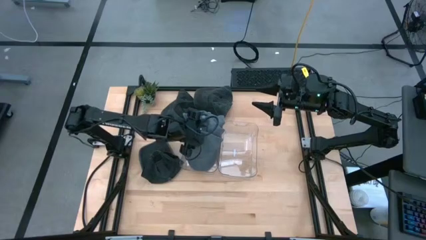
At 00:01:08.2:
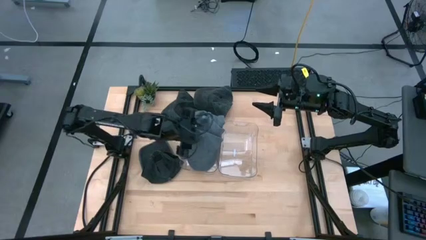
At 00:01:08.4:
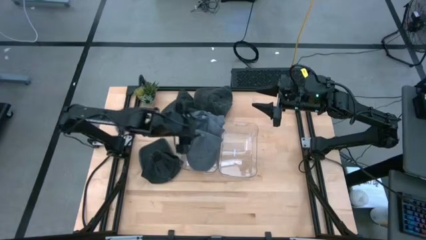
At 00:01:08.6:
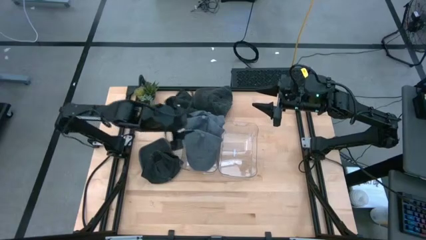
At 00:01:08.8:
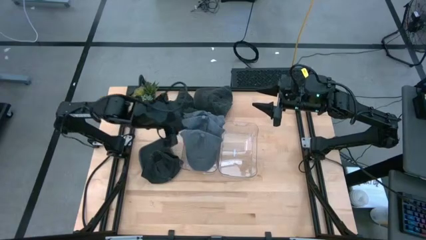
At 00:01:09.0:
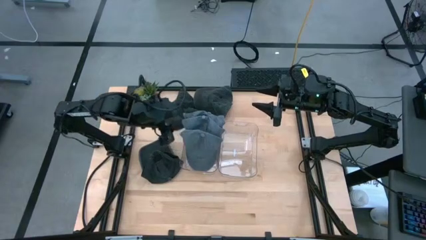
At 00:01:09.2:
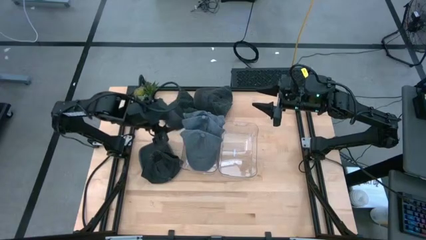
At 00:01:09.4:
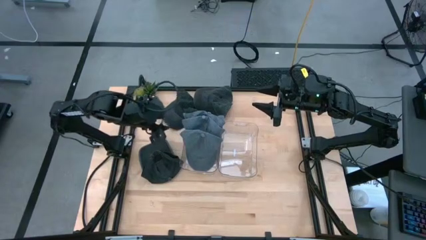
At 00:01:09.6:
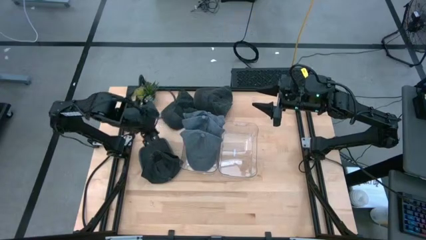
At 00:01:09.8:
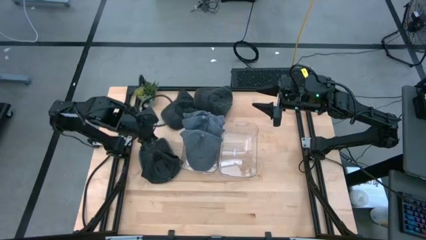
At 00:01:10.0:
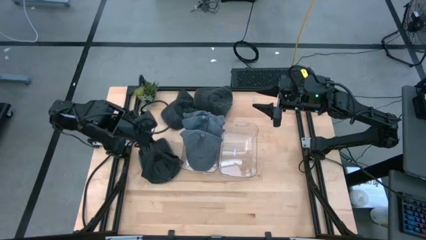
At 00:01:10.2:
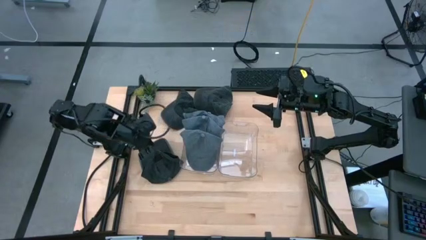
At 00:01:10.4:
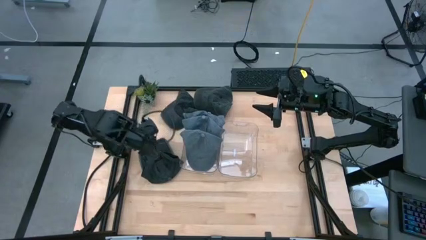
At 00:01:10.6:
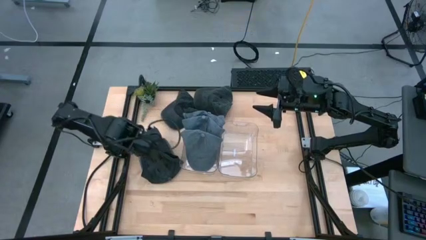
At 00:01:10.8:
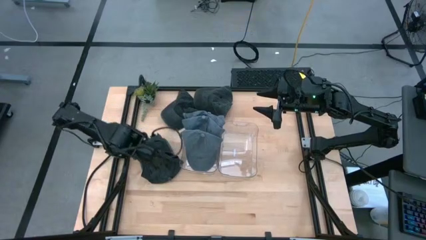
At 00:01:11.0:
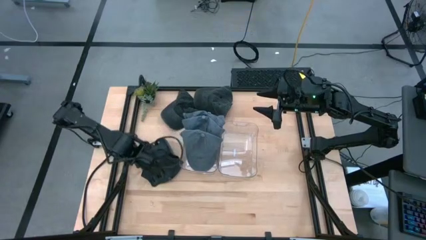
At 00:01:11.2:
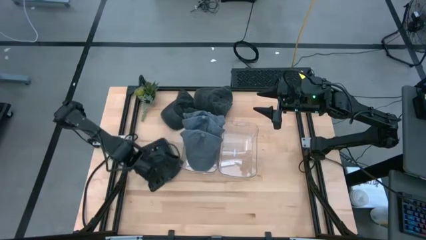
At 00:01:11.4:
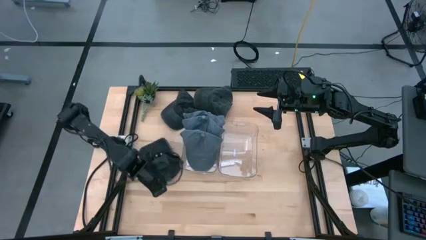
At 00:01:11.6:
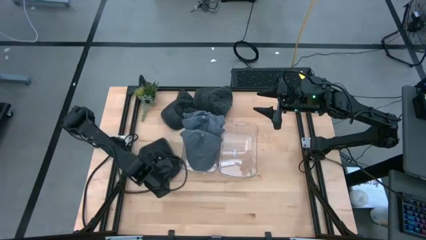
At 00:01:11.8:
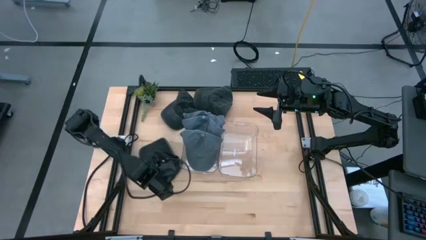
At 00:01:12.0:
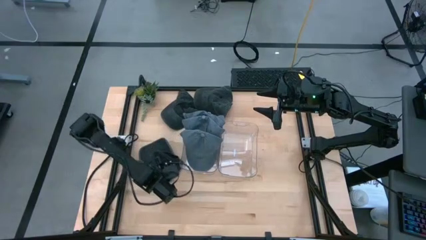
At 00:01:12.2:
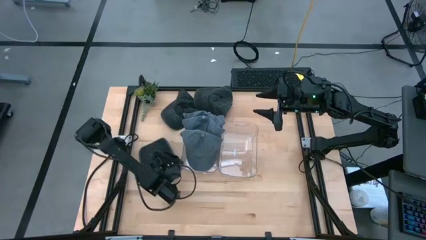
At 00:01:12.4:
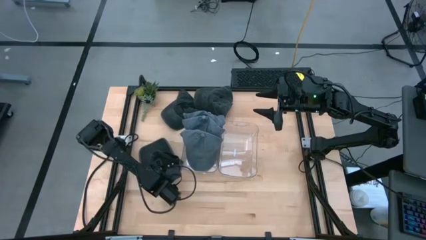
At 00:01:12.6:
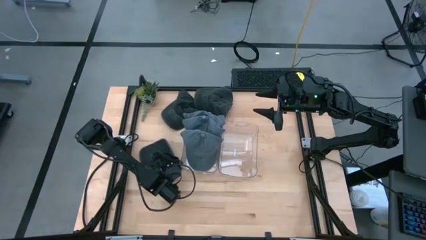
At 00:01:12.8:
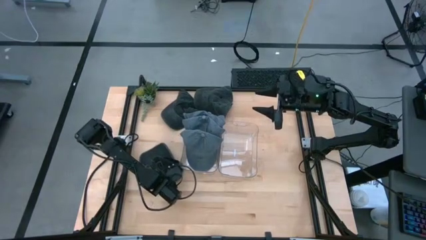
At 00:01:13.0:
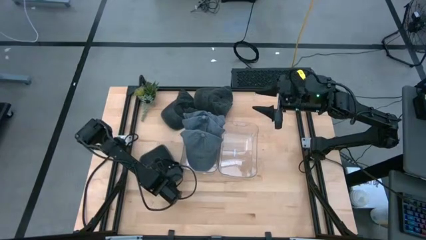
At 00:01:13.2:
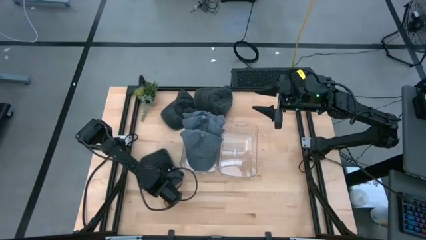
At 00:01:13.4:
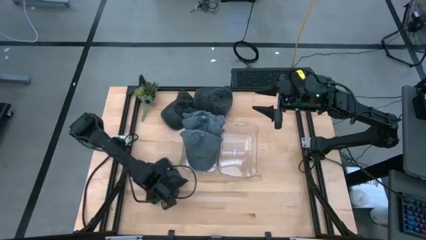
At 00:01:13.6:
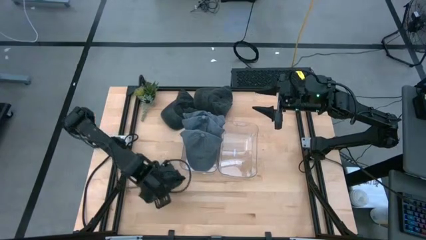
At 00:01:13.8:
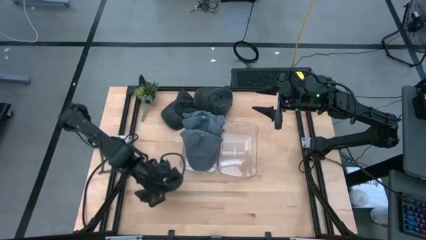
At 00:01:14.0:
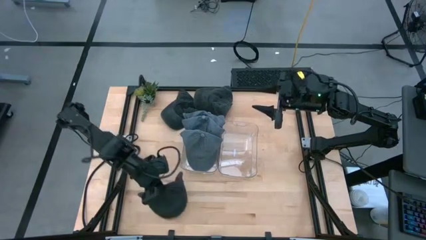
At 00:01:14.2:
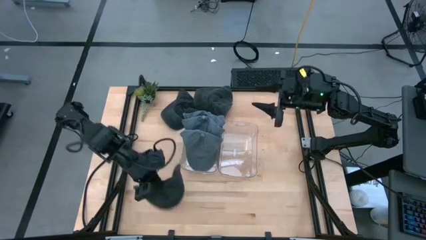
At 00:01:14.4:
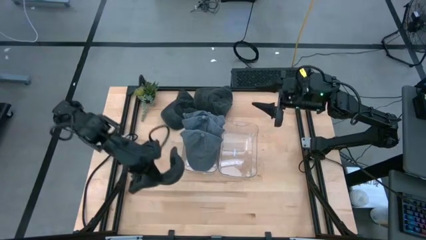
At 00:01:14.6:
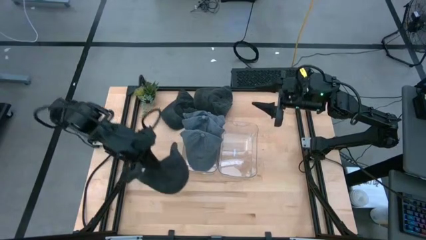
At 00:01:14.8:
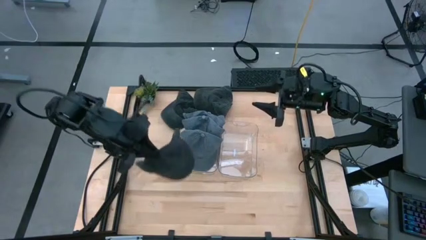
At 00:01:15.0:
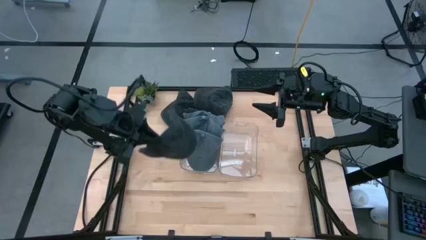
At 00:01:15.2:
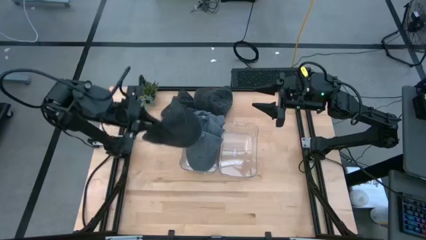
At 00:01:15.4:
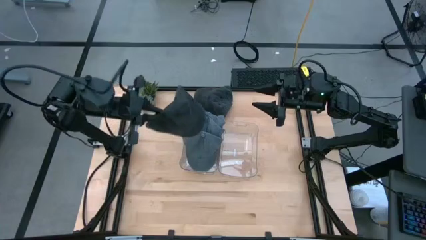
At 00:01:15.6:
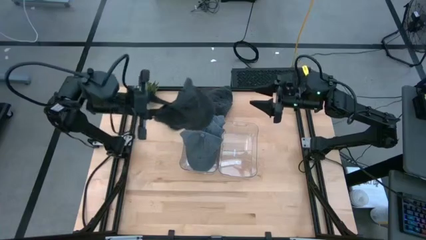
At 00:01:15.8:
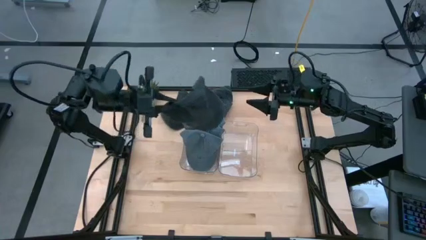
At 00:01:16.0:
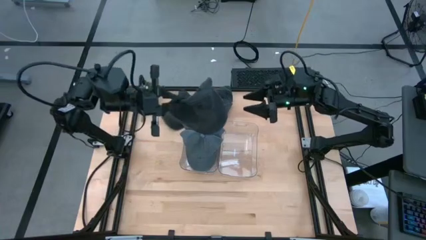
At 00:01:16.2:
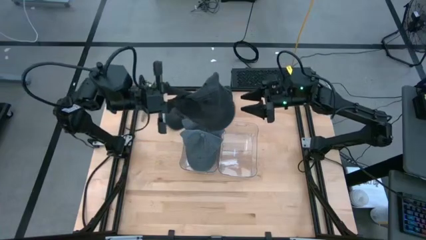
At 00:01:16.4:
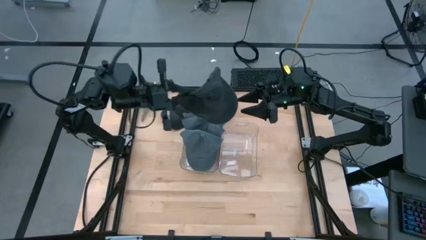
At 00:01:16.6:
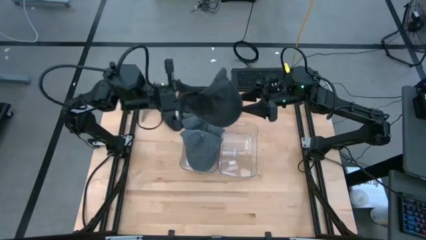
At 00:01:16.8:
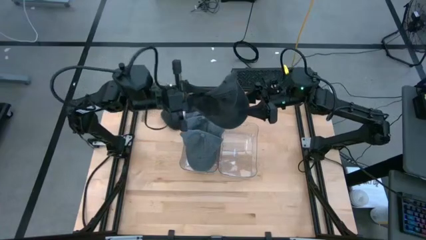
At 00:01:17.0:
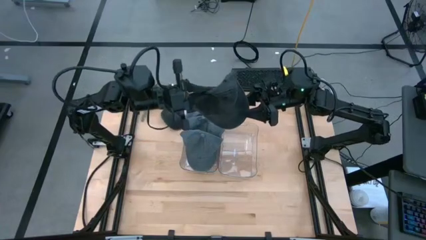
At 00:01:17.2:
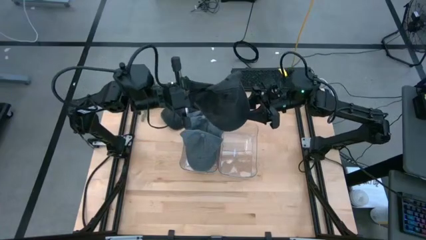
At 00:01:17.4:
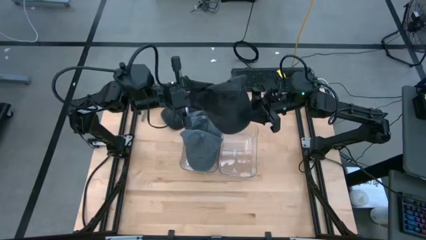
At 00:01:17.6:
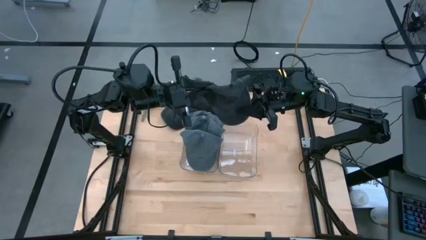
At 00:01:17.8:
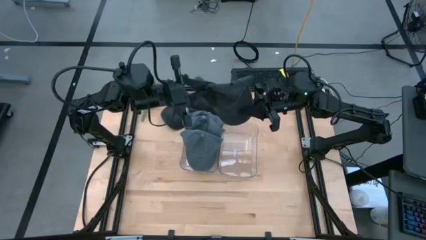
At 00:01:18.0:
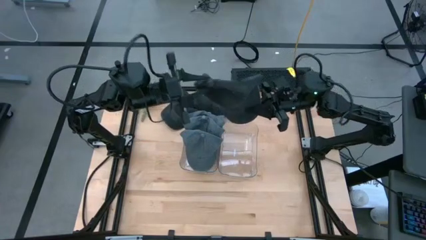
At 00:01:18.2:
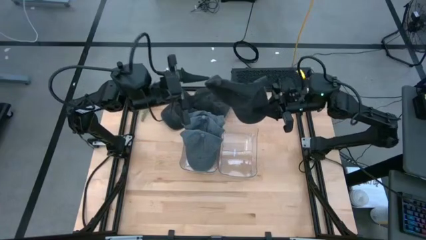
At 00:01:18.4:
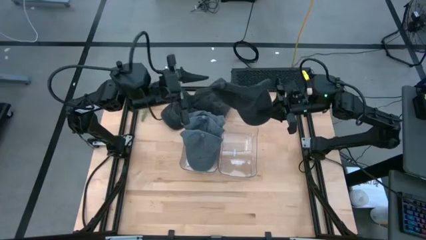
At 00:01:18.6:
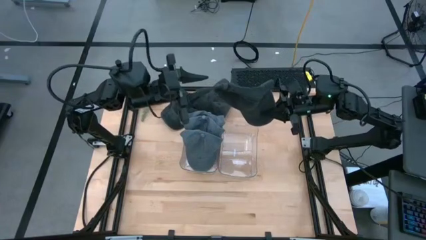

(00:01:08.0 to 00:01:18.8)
Task: Pick & Place hat
Put the bottom black cap into the right transparent bin

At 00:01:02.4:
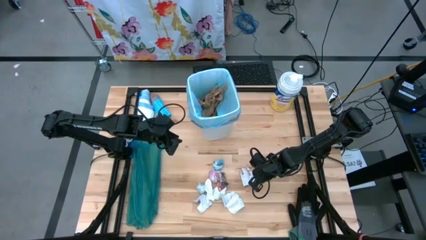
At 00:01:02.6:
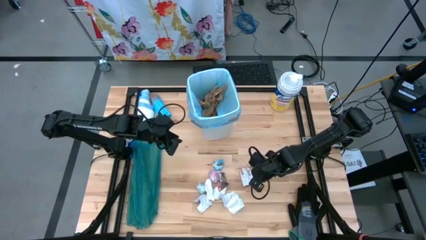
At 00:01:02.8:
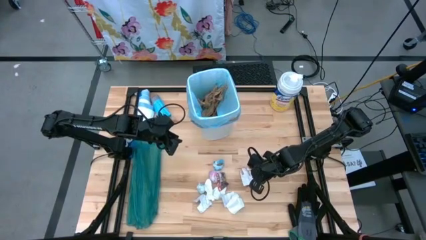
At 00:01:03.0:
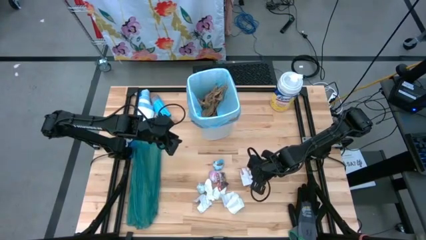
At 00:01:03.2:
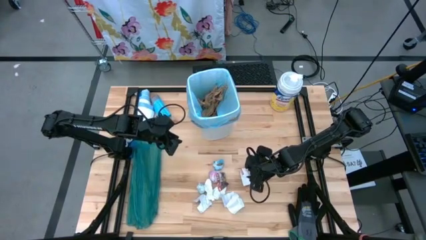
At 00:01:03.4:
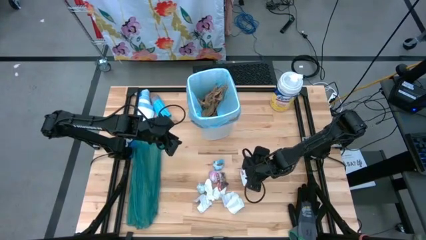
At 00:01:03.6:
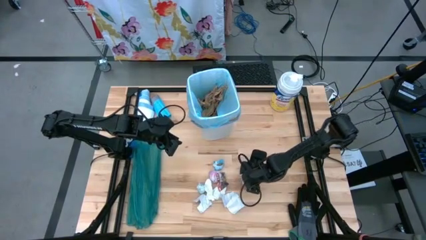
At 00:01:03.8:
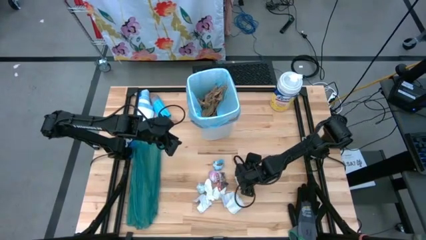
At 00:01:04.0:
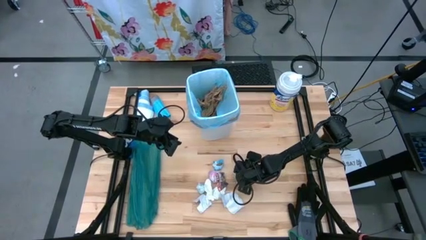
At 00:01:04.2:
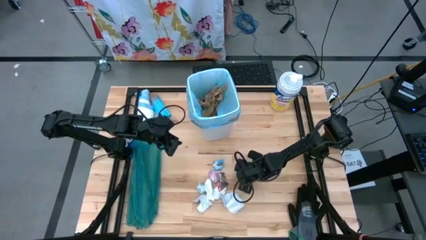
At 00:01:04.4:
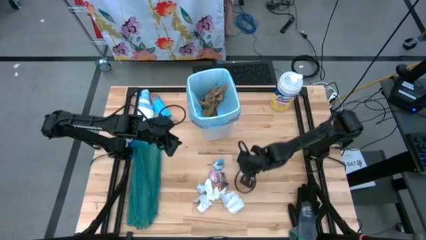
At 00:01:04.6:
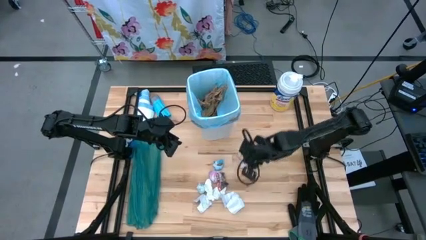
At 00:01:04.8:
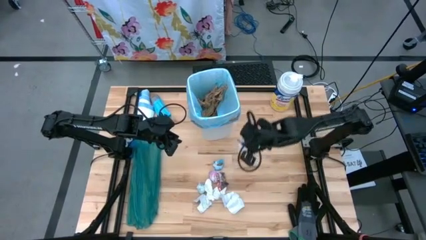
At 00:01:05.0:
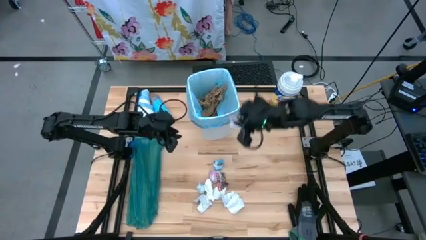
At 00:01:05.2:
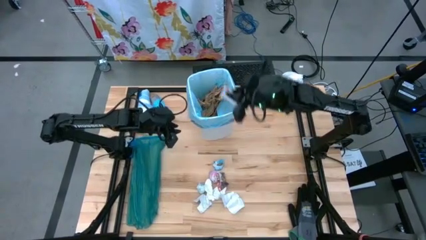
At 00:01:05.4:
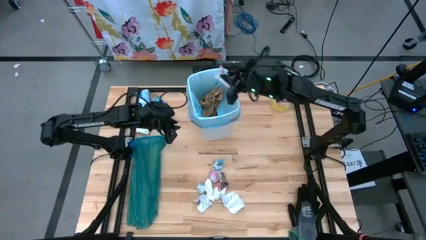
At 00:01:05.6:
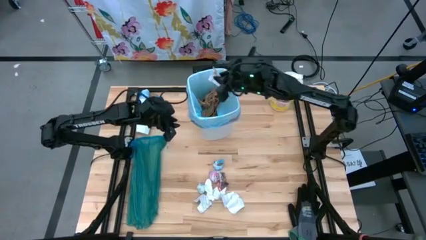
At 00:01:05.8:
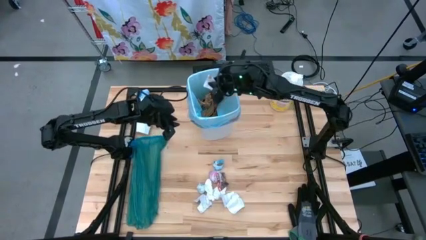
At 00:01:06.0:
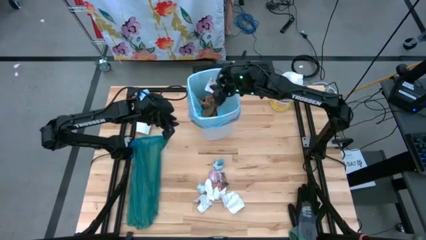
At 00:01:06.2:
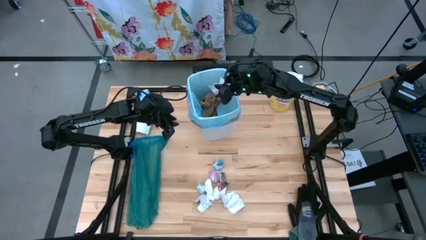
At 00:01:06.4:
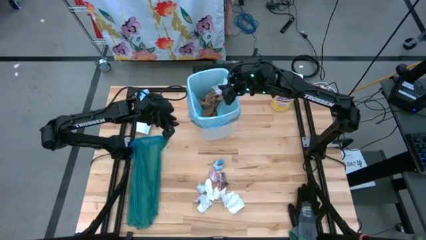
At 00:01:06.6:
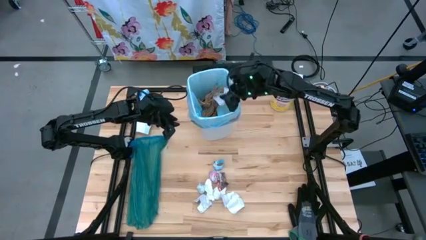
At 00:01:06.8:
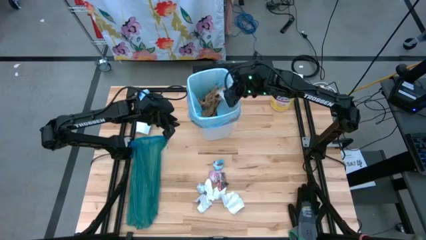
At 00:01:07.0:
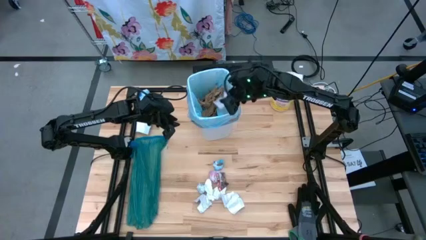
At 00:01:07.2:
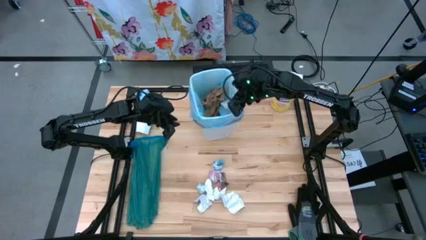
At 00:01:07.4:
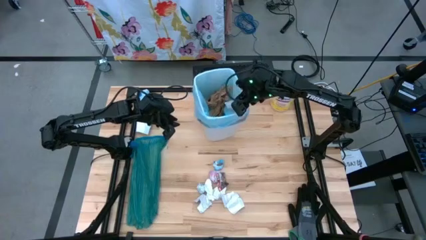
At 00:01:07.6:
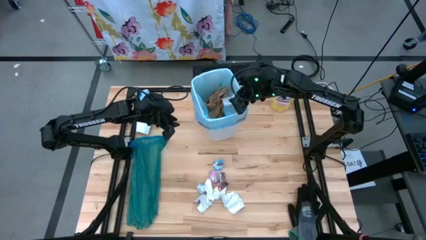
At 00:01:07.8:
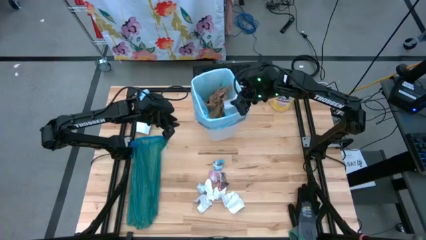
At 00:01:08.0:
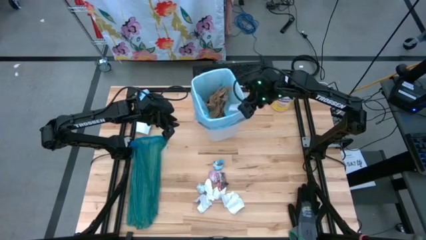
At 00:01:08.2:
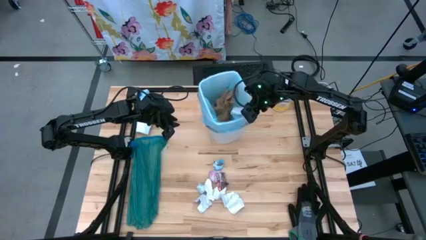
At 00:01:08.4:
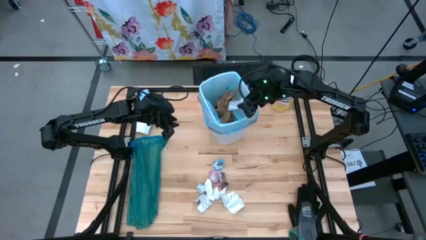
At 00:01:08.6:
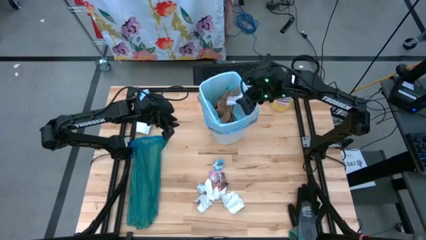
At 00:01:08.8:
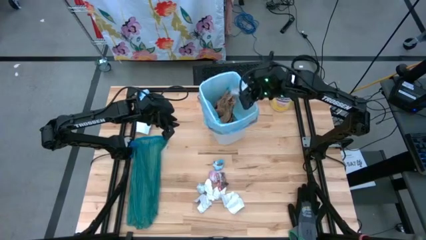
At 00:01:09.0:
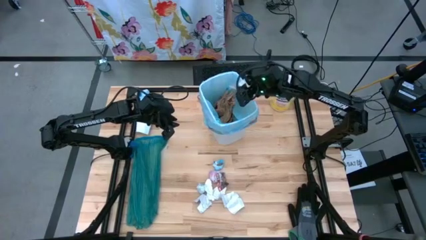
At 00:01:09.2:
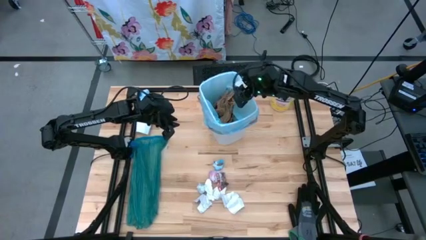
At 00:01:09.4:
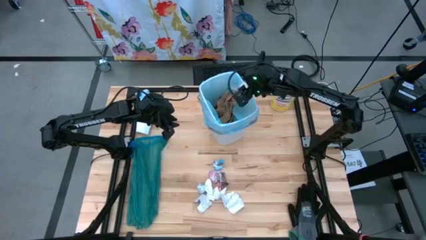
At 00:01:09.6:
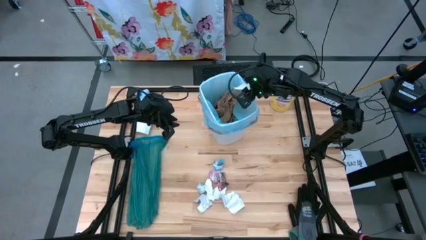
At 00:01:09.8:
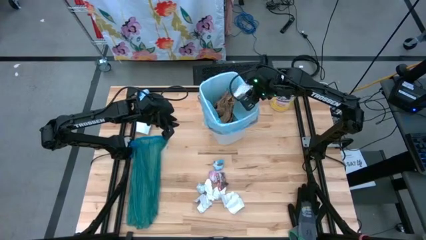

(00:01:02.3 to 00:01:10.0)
Task: place trash/remove bag and relplace
Put the white paper into the trash bin
